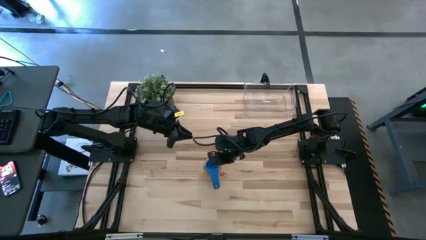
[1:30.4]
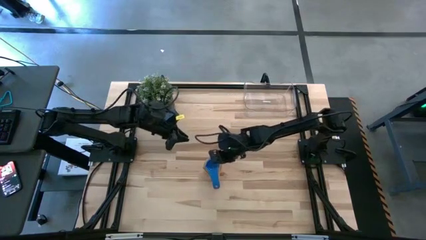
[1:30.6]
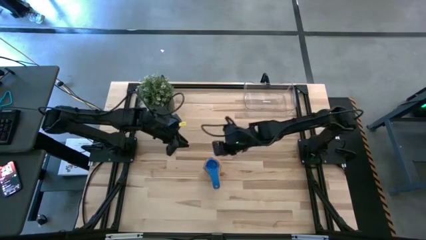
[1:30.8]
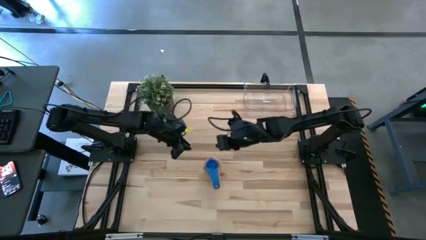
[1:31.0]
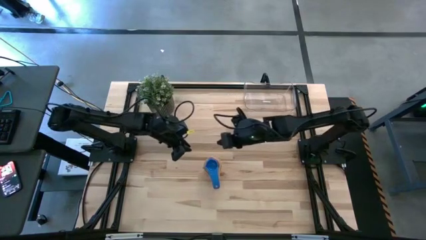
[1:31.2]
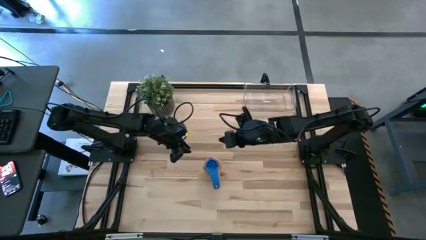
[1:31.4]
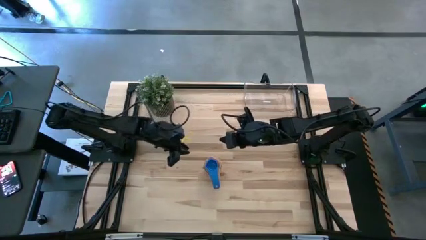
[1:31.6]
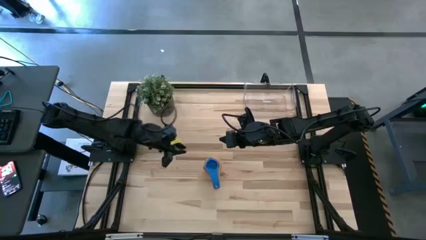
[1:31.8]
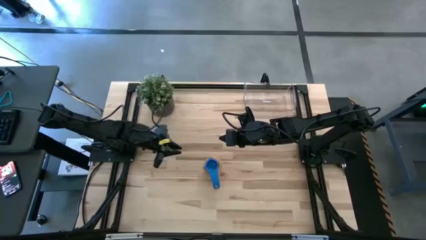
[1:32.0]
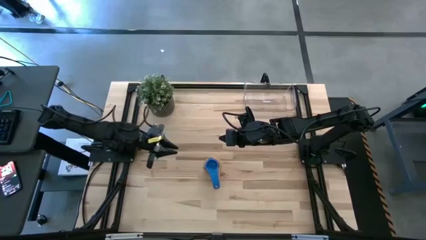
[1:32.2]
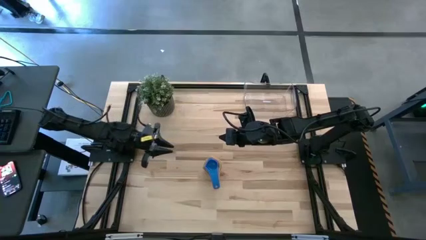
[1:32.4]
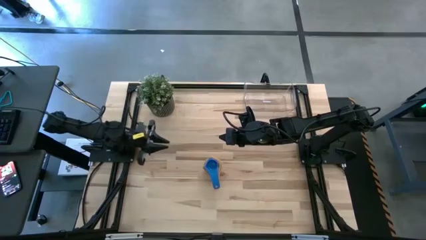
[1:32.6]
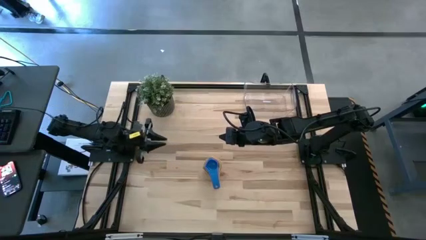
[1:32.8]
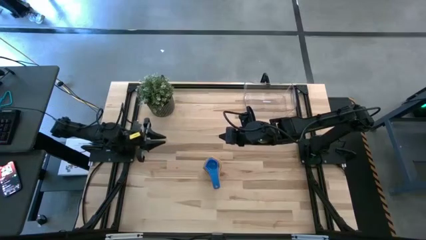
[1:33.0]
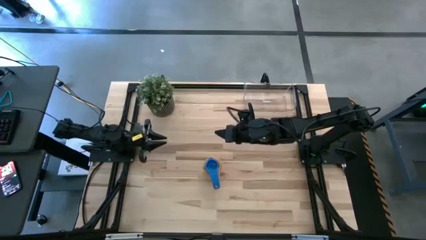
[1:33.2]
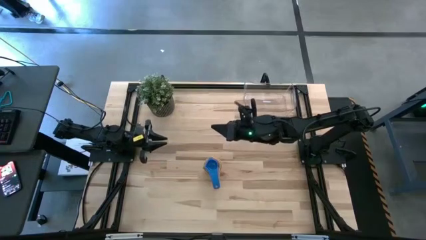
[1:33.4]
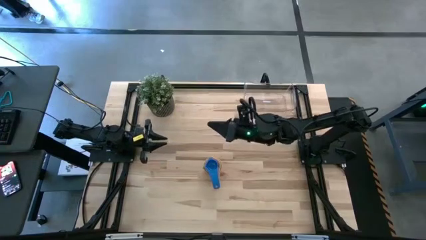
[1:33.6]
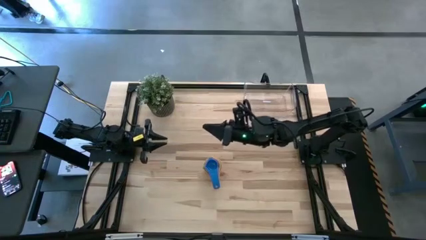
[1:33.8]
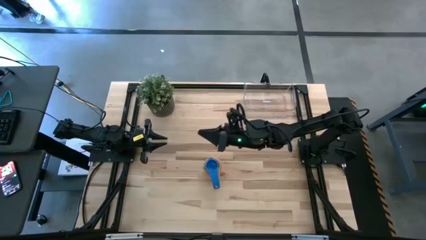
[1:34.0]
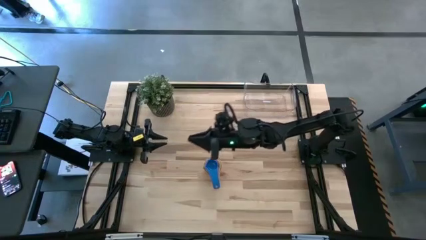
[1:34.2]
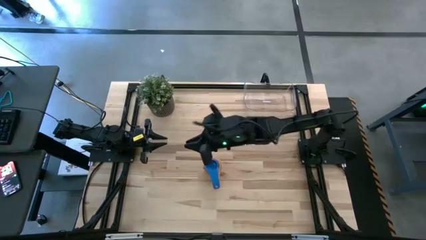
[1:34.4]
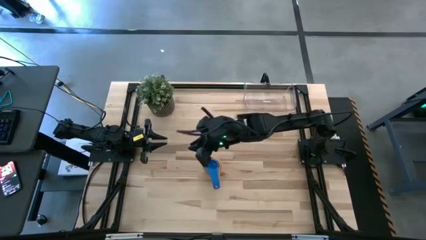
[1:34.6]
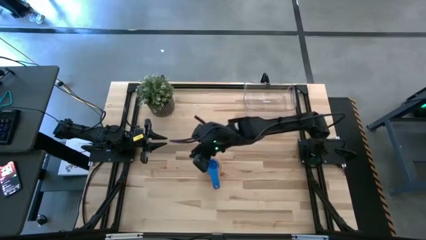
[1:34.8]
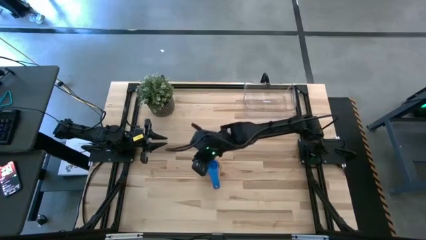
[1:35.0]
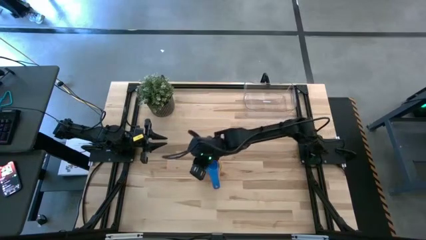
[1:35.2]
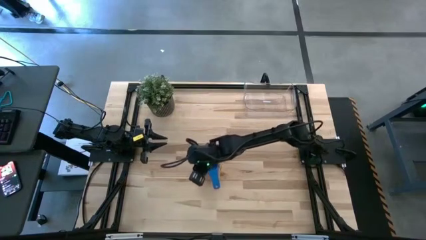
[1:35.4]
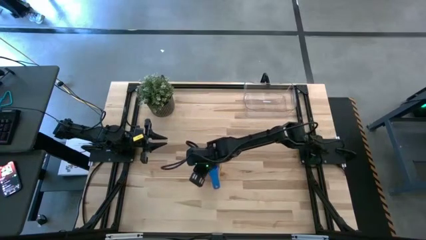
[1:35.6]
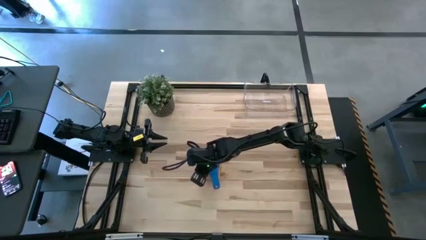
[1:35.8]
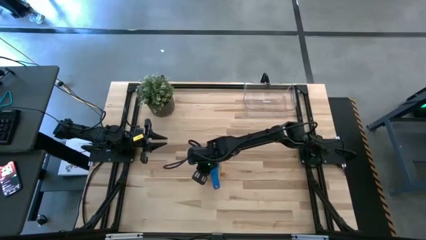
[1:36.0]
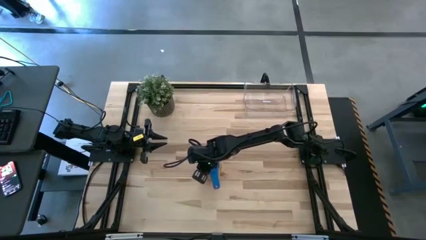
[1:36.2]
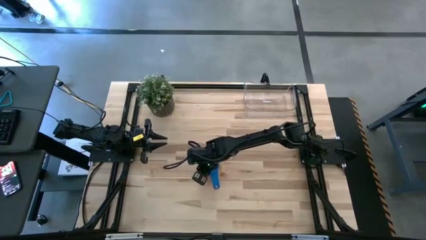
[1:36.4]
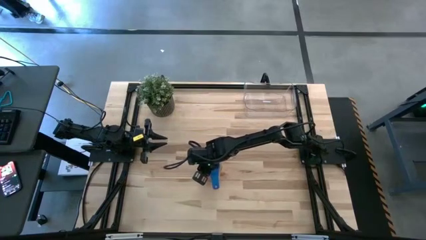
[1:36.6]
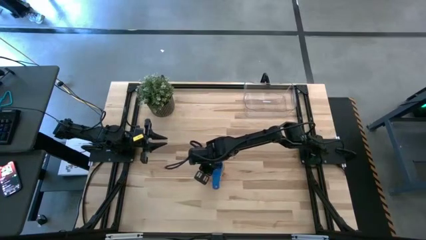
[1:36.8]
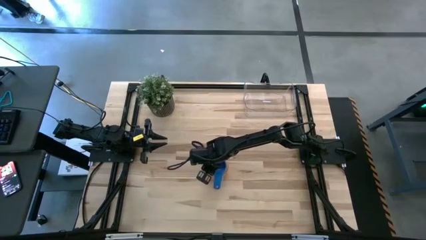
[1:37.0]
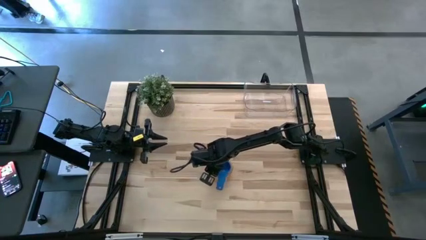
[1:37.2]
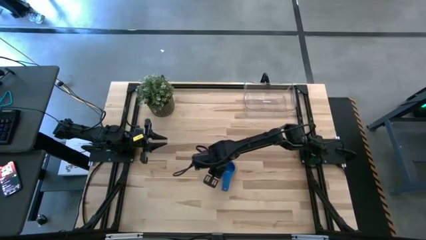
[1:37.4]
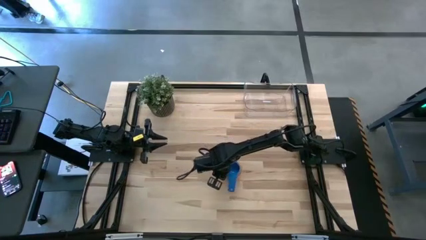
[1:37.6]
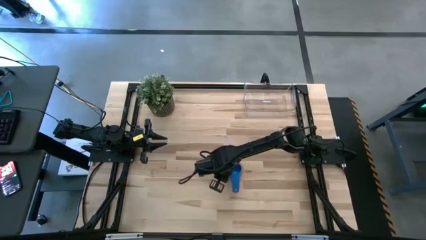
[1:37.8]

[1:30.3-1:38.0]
Task: Nest measuring cups in basket
Adjust the nested measuring cups

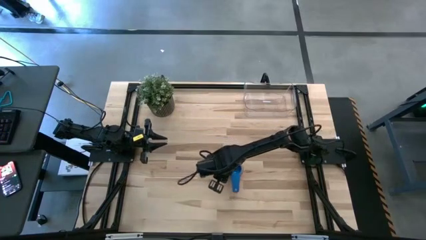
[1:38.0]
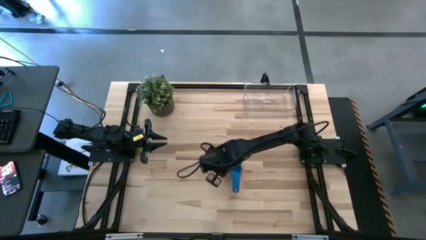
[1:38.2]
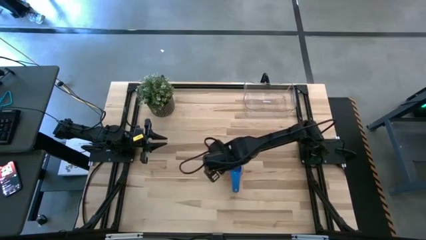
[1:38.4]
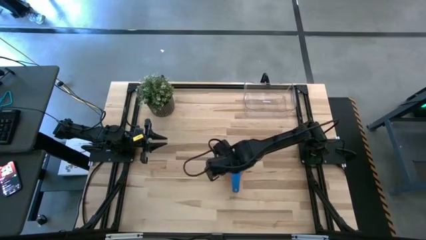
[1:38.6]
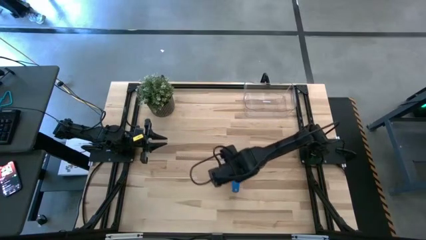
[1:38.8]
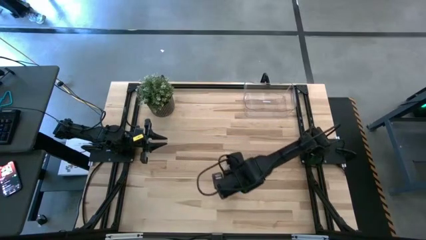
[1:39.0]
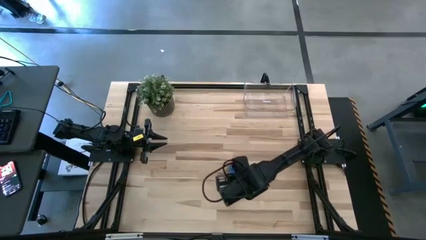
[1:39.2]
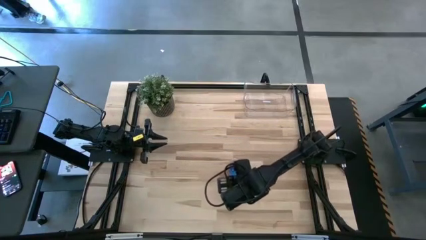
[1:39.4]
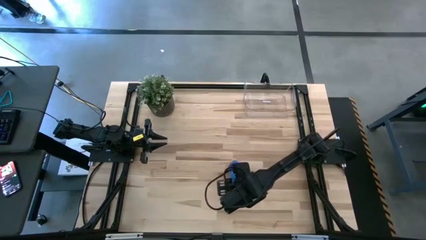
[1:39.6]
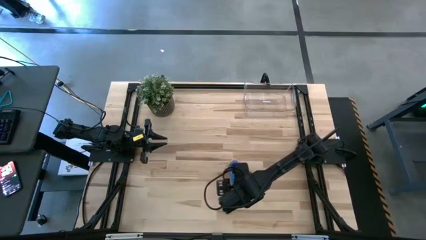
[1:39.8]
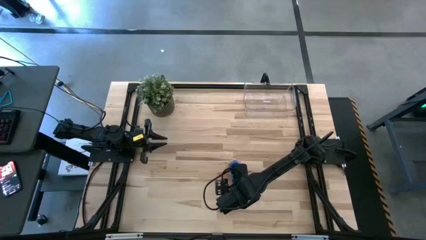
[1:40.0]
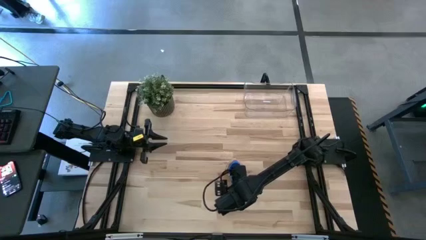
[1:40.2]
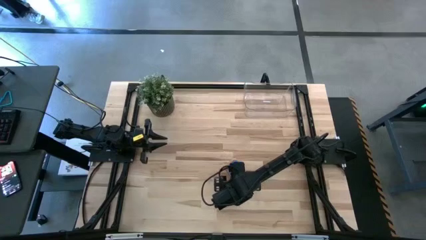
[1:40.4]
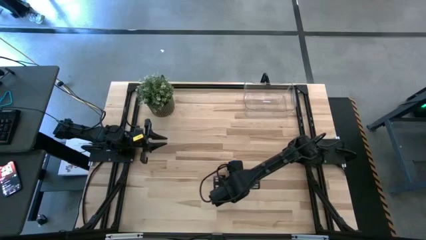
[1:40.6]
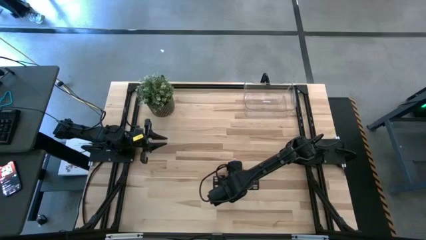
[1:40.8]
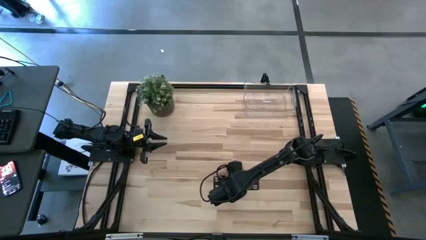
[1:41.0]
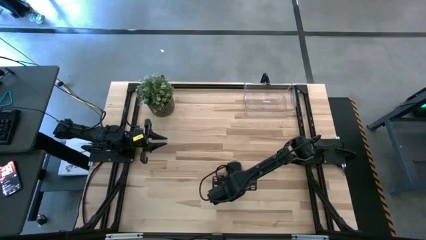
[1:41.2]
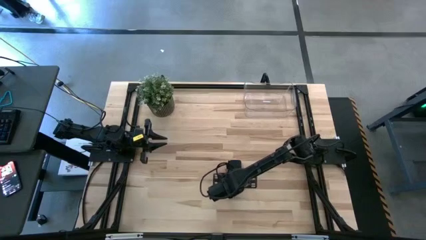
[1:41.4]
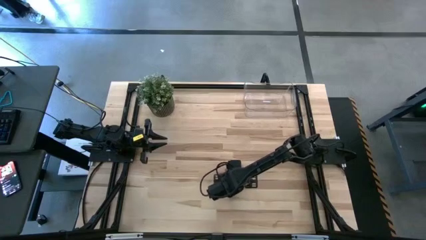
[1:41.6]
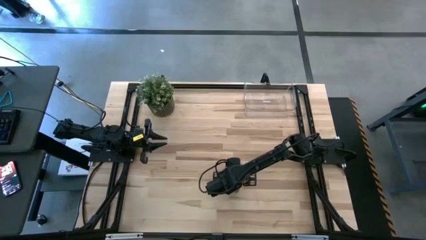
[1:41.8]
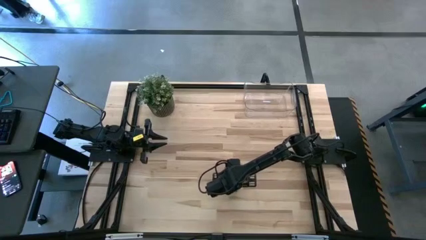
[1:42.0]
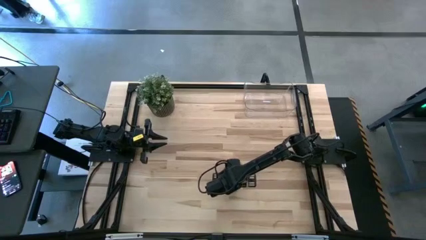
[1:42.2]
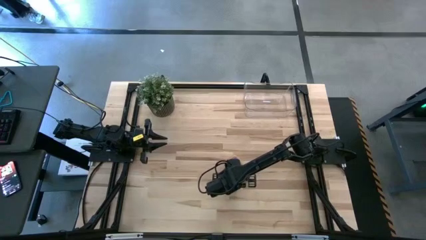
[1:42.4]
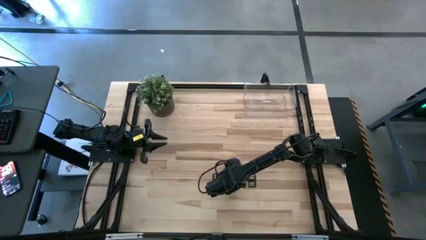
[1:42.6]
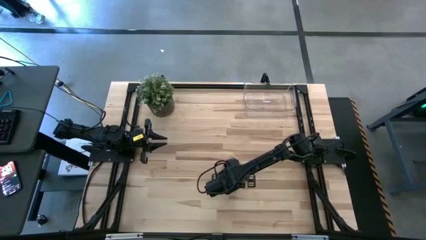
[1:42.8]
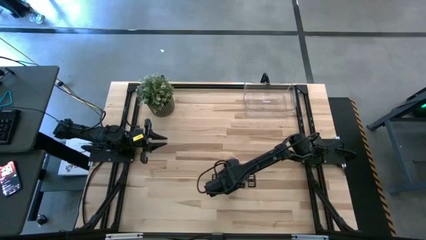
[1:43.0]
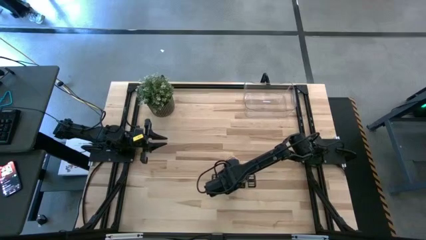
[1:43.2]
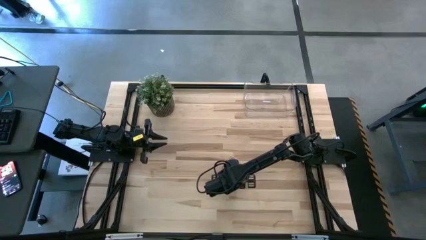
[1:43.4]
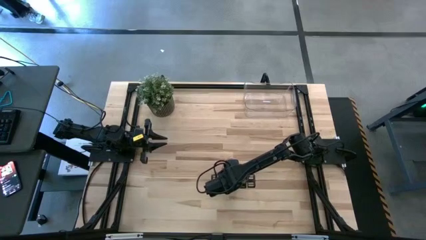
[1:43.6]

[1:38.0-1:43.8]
Put the nested measuring cups into the transparent bin

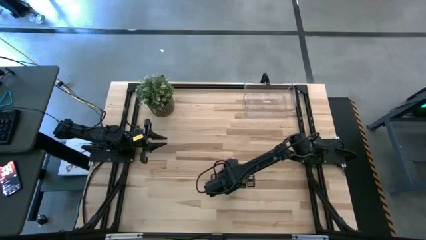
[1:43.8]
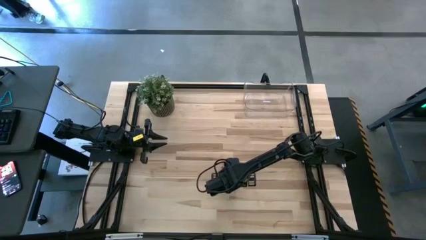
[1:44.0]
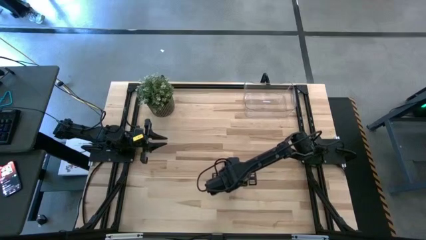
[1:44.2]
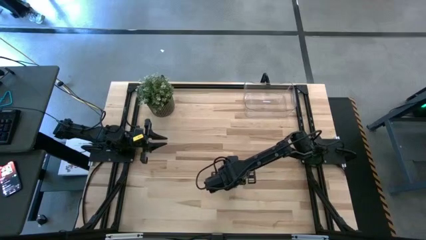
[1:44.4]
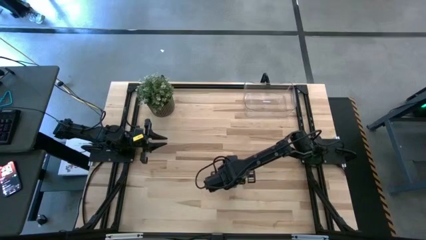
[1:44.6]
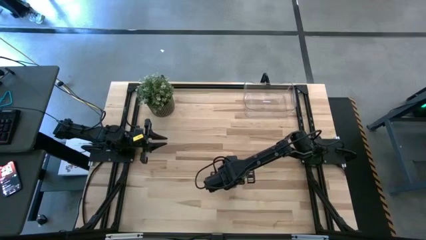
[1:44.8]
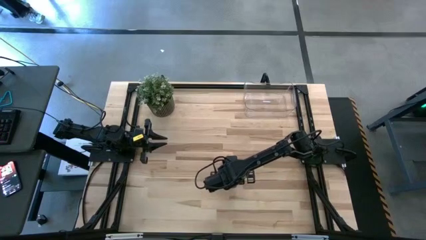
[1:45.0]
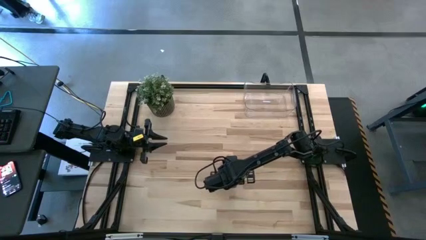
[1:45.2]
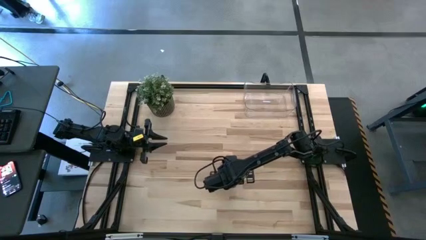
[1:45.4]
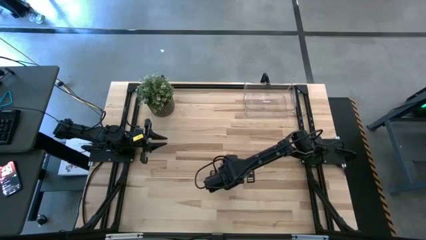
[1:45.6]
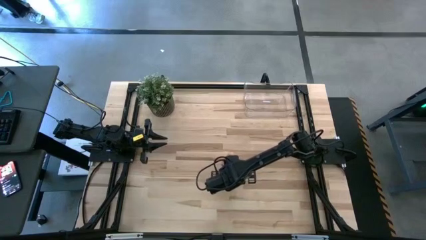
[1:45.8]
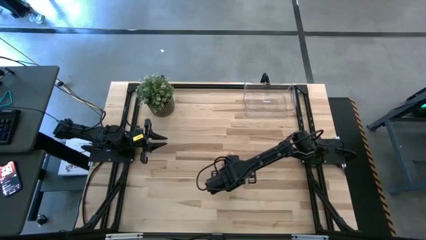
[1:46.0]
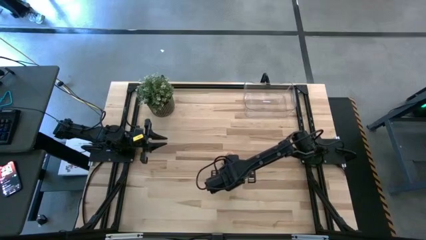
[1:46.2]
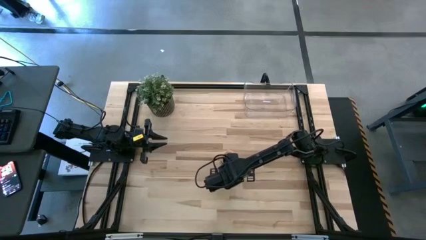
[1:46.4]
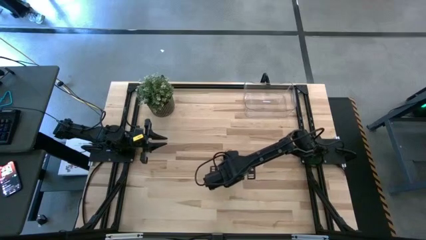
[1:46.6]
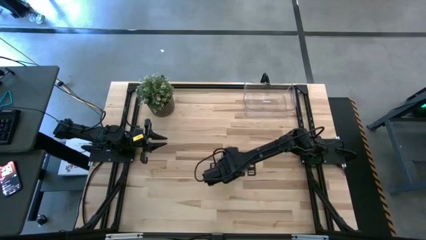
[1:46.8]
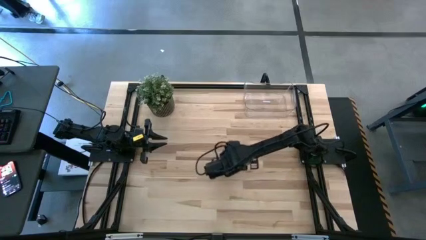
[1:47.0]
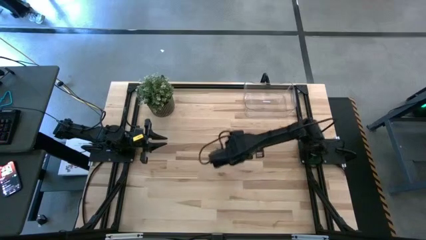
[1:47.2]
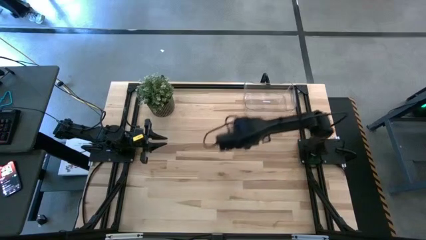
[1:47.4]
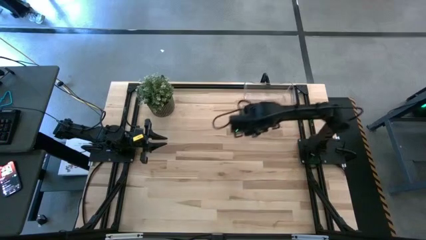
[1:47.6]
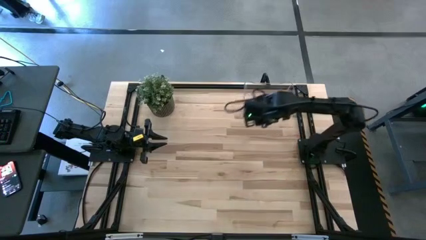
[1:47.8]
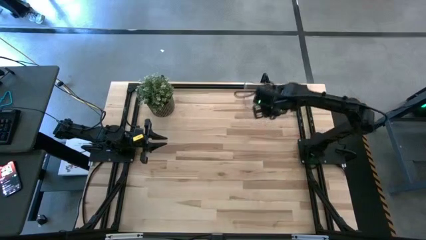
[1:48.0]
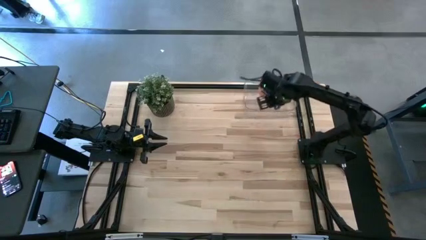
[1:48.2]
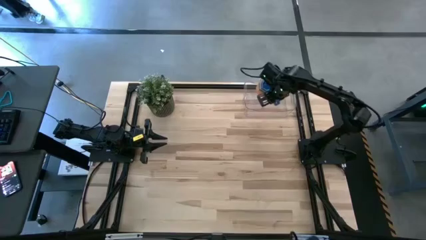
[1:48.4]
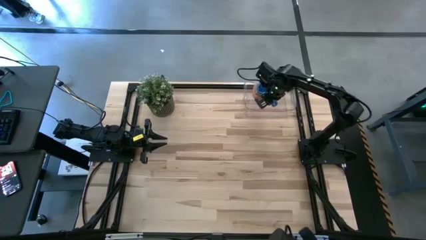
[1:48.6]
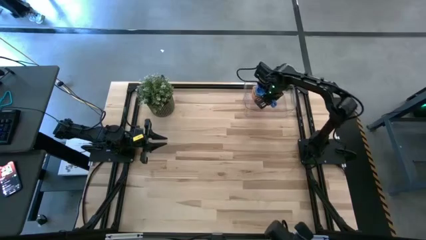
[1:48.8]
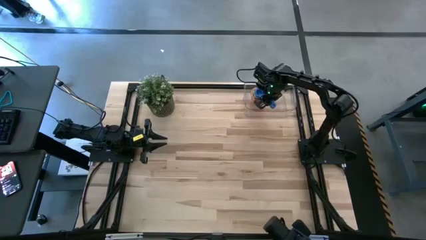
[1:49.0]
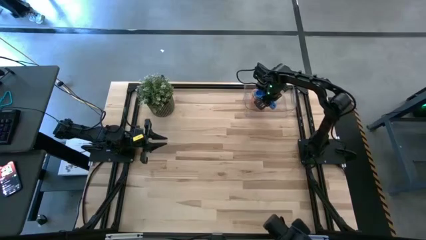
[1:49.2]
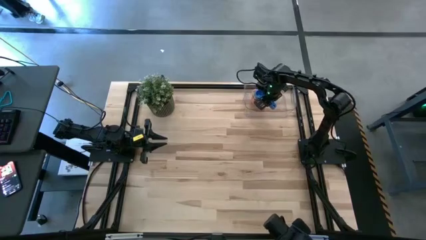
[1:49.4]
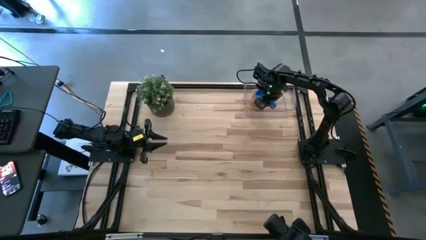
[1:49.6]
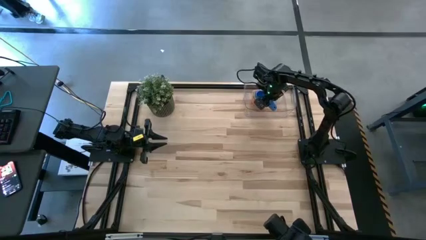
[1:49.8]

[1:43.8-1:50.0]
Put the nested measuring cups into the transparent bin
